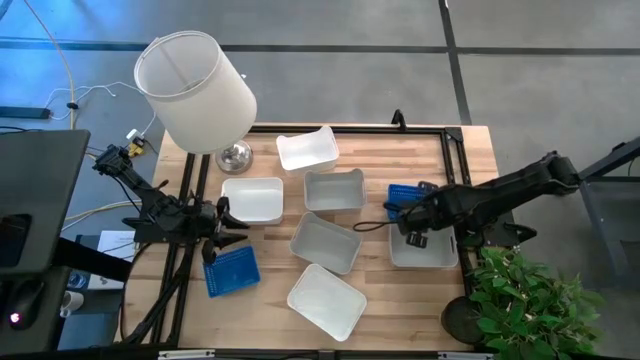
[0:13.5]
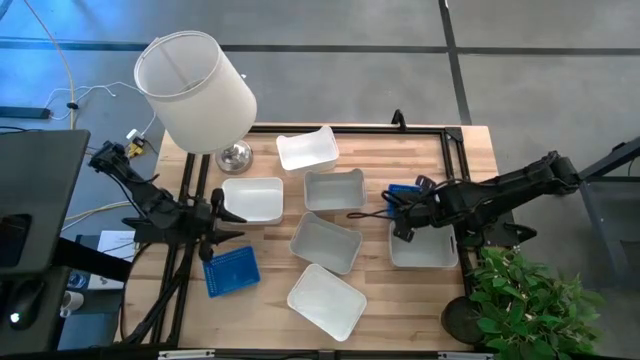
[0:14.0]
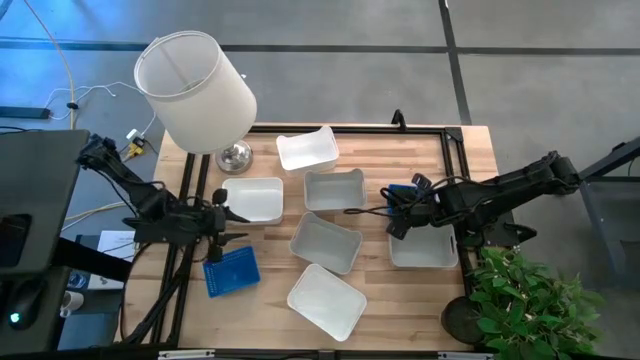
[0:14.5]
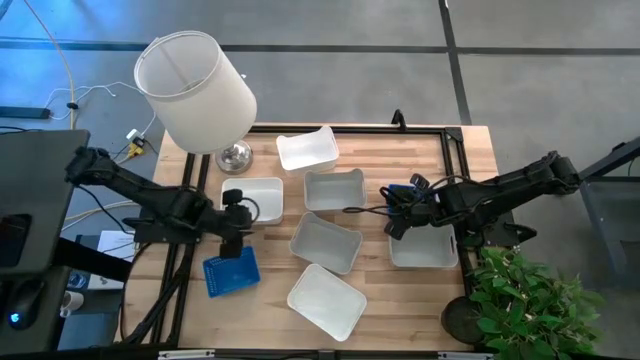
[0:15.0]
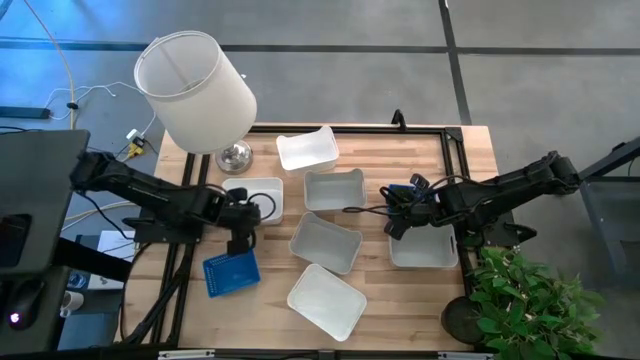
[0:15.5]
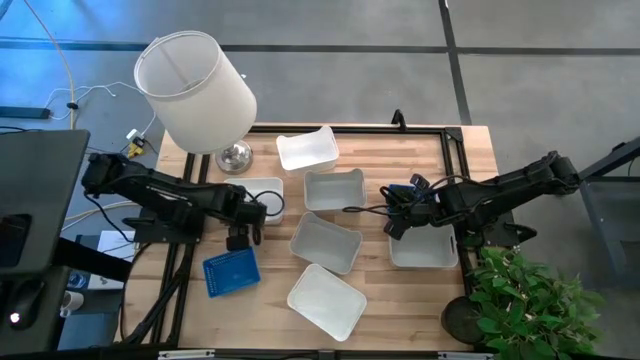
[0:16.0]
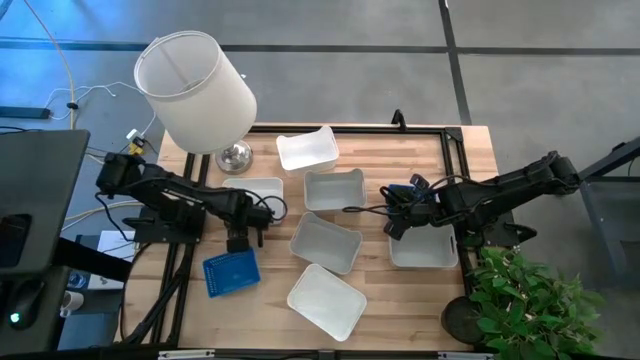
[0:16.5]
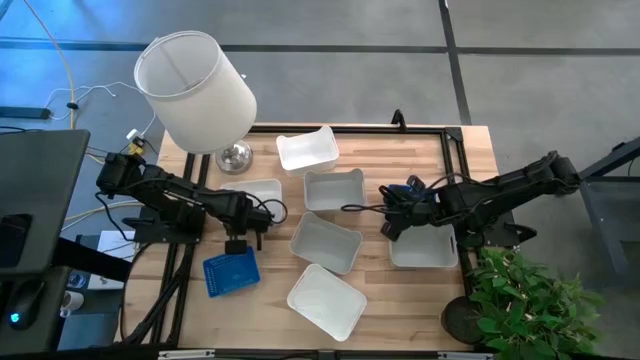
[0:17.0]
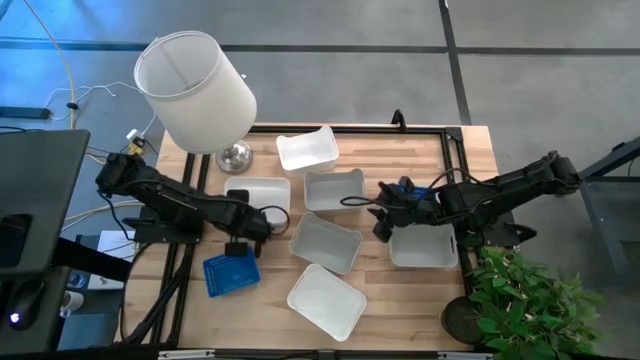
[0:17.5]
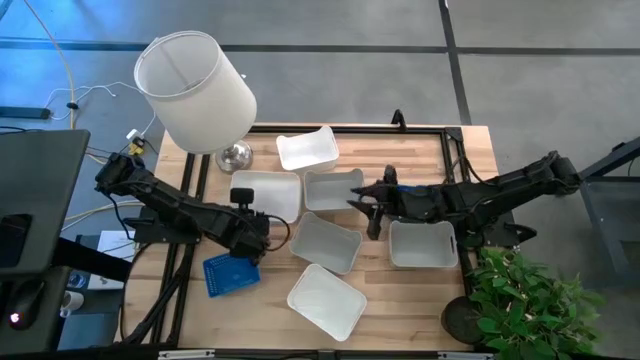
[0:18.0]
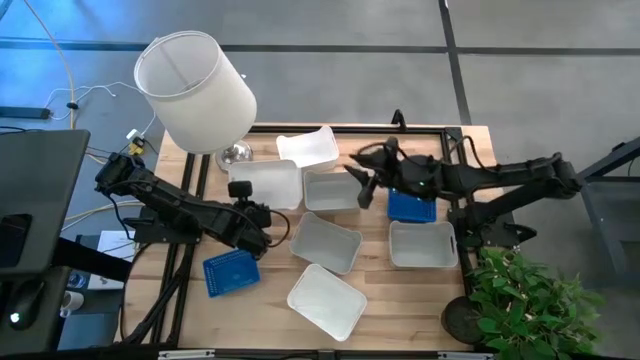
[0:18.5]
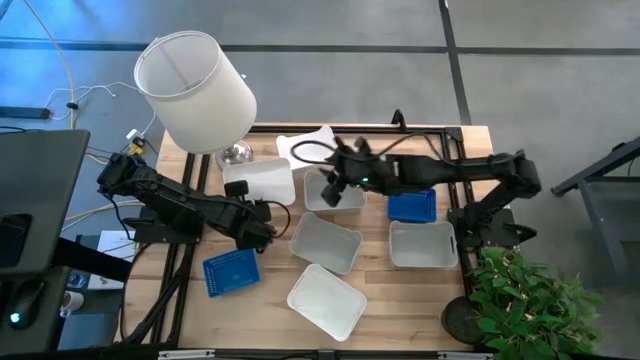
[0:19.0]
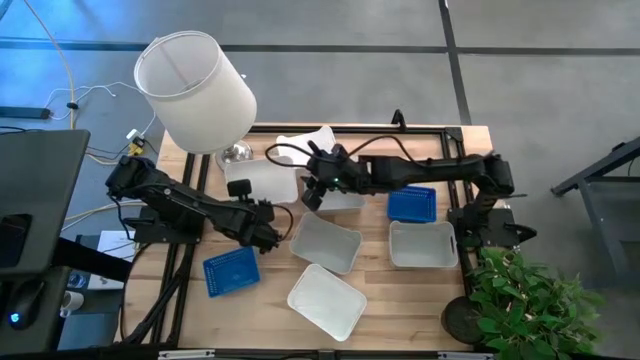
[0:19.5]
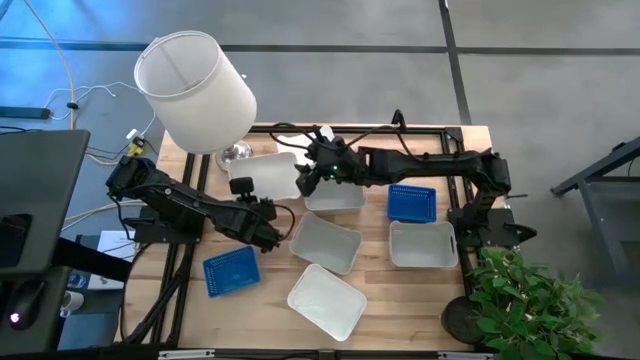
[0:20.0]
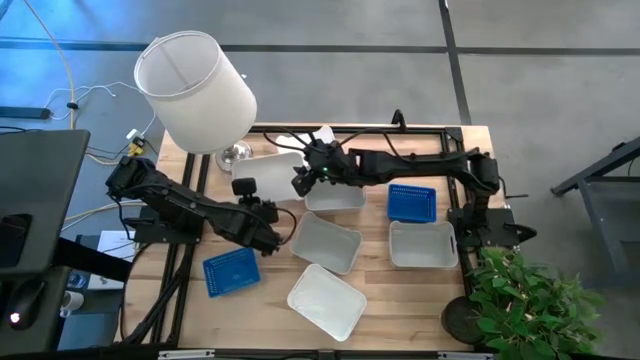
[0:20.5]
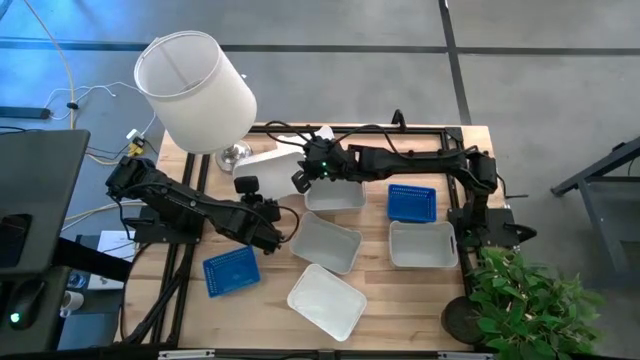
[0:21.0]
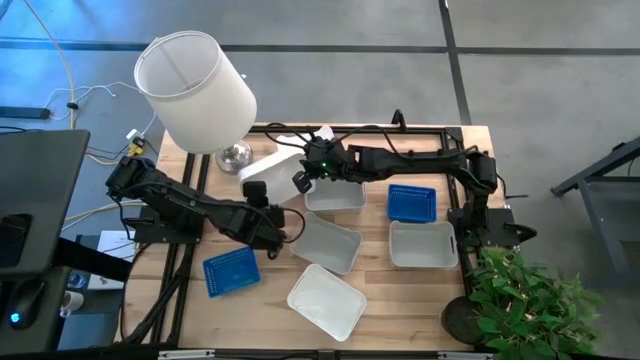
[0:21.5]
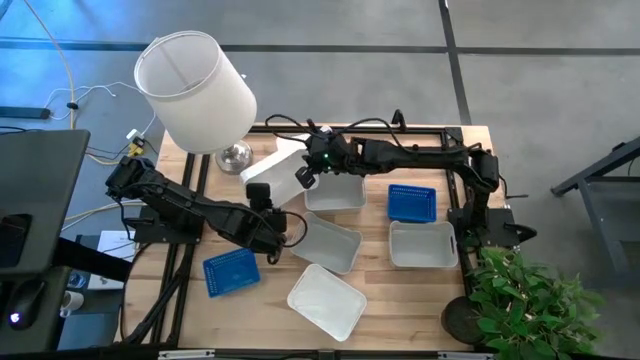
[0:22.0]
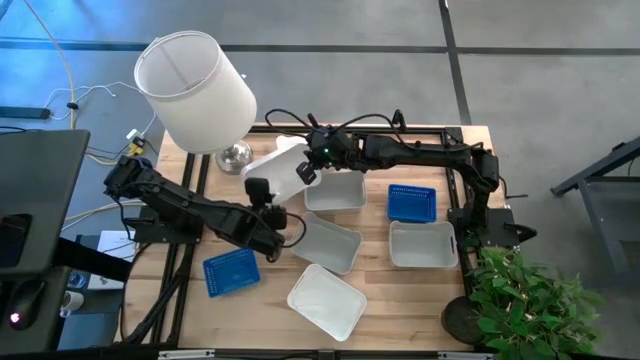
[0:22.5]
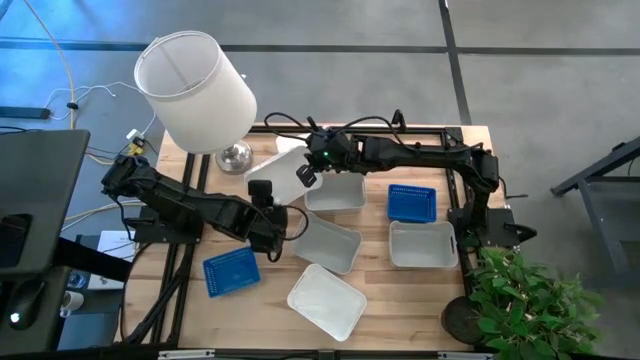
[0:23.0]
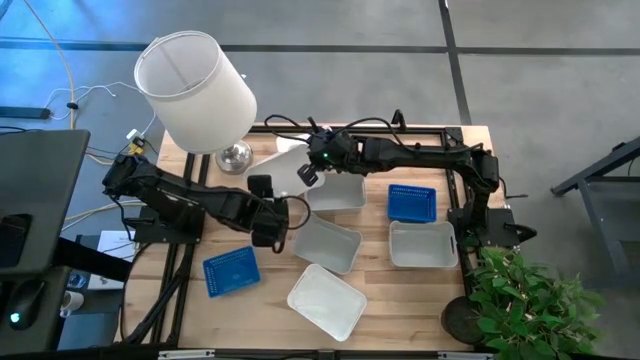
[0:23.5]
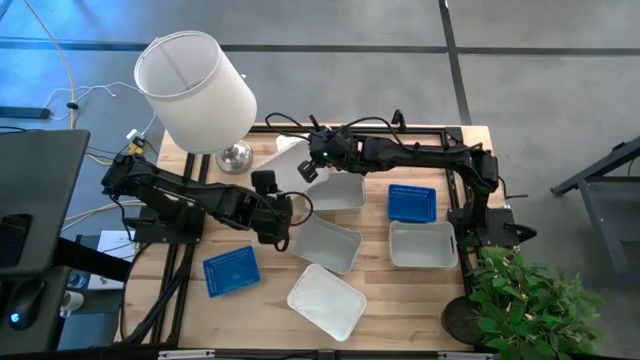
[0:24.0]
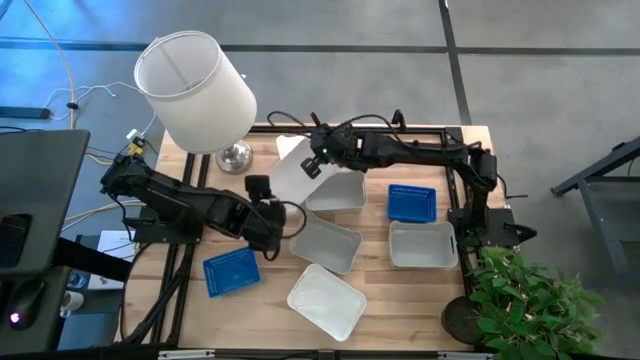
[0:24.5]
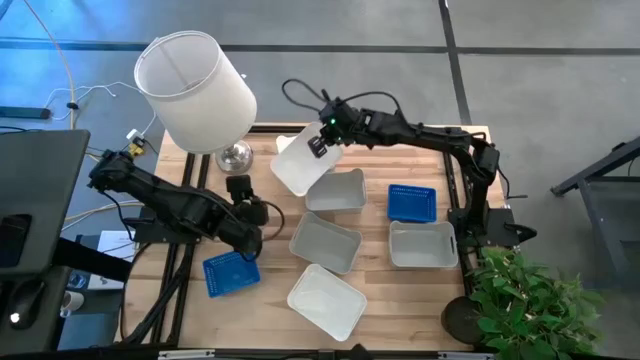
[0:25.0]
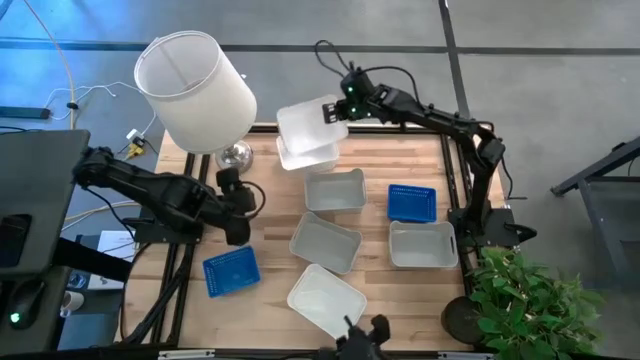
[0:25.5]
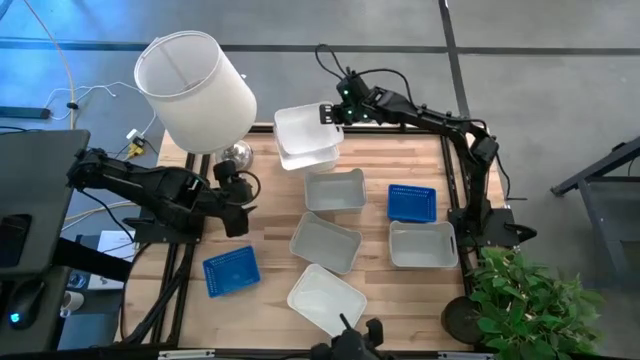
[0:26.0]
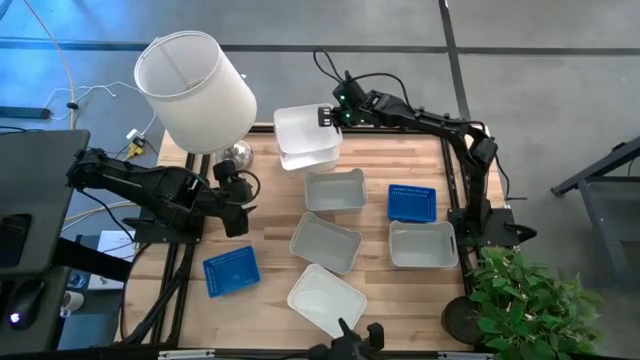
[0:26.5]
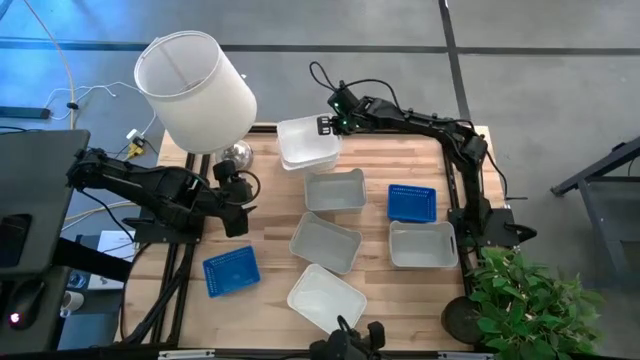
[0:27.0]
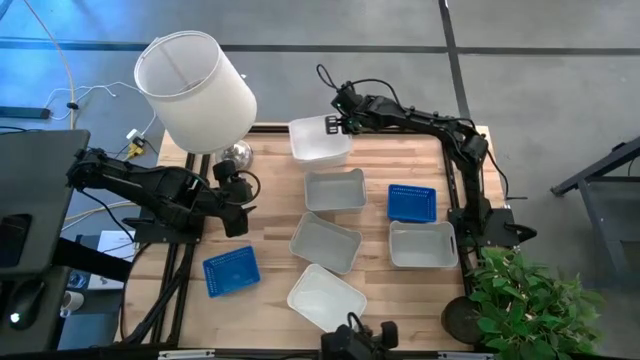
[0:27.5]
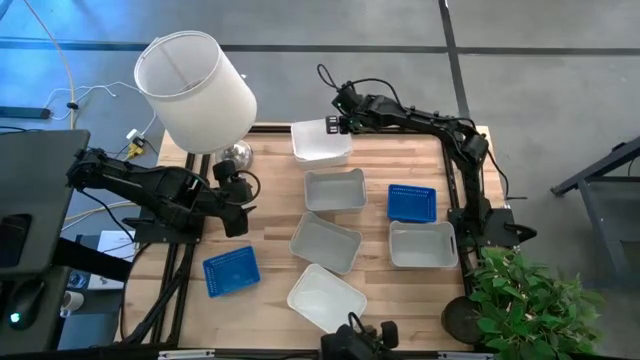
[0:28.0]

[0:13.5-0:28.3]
Stack the middle white bin into the top white bin

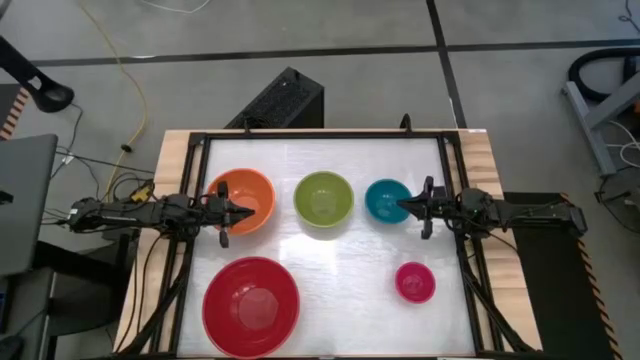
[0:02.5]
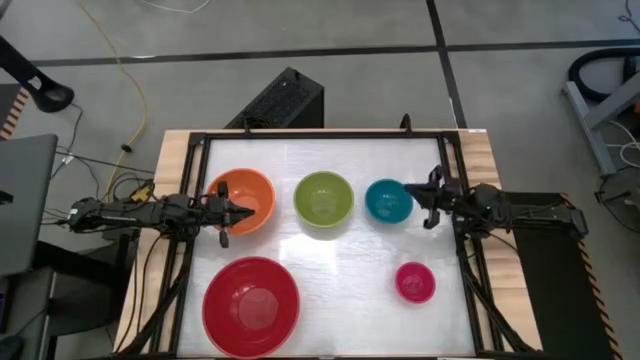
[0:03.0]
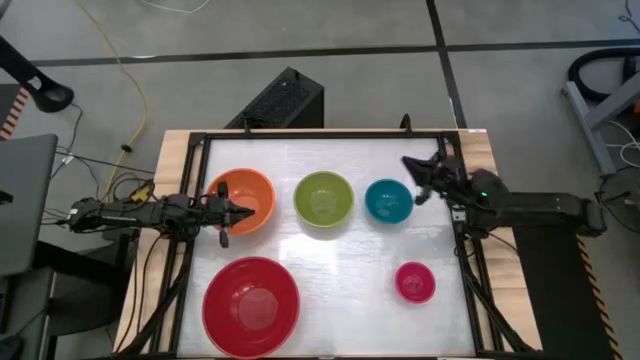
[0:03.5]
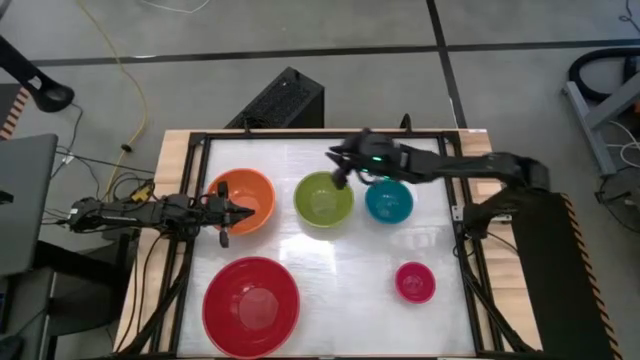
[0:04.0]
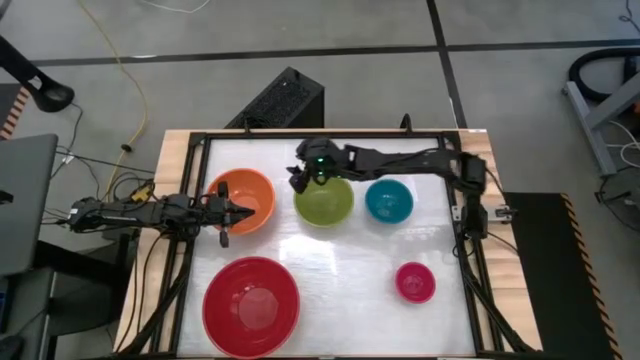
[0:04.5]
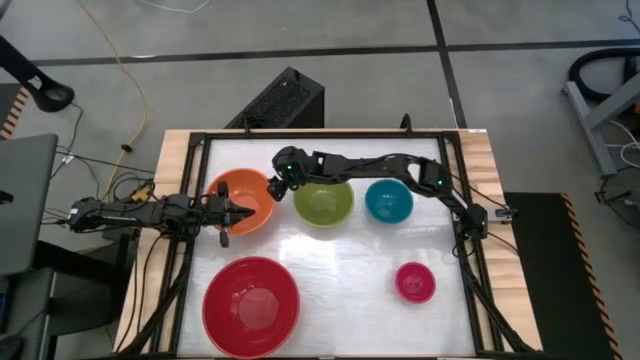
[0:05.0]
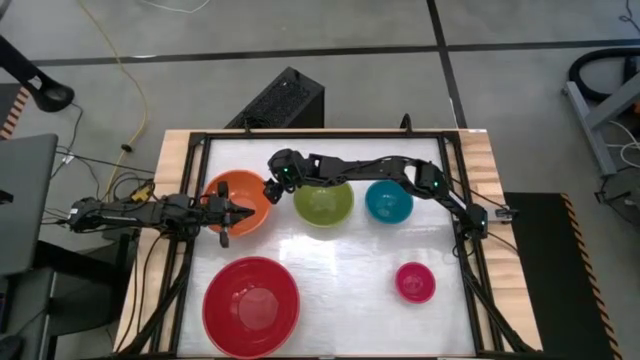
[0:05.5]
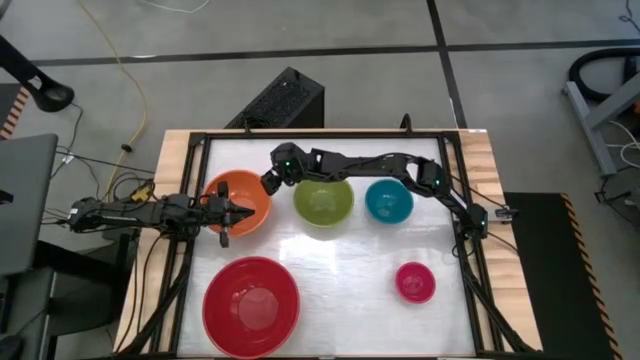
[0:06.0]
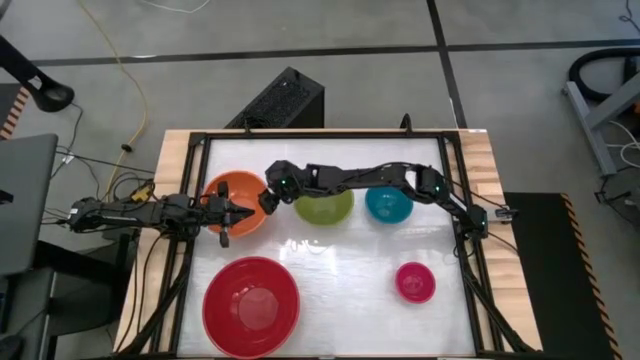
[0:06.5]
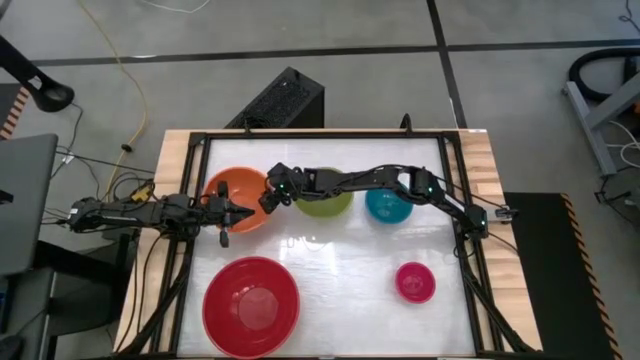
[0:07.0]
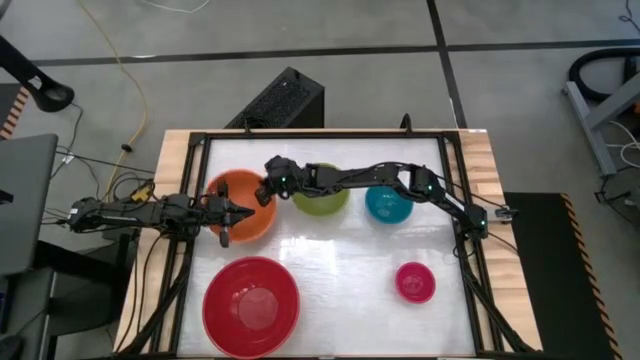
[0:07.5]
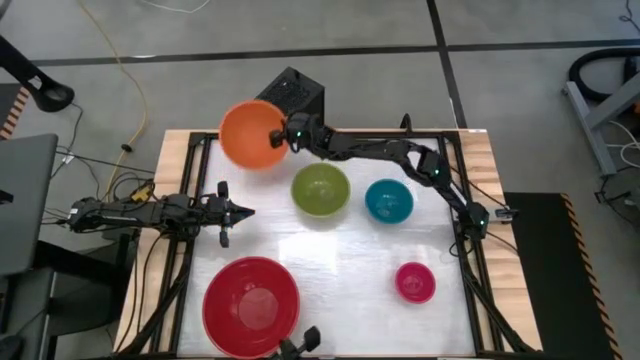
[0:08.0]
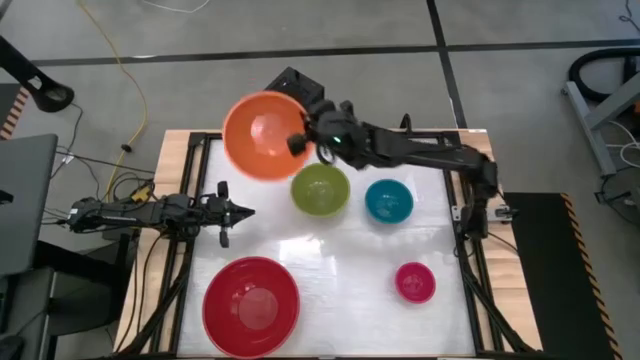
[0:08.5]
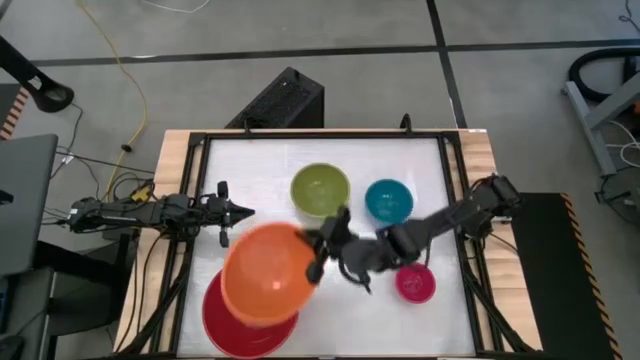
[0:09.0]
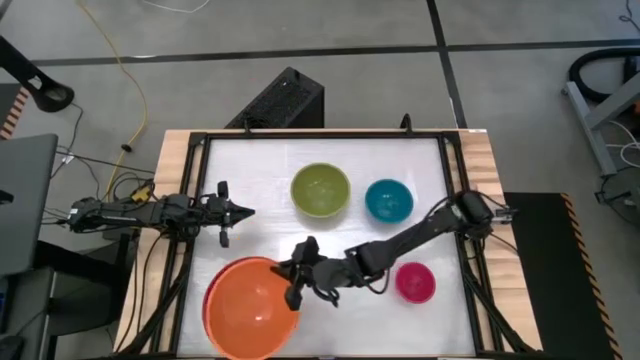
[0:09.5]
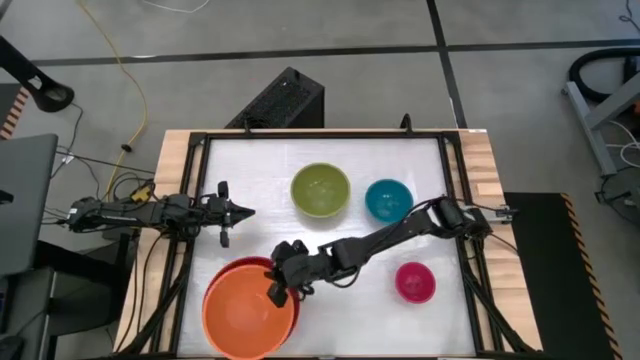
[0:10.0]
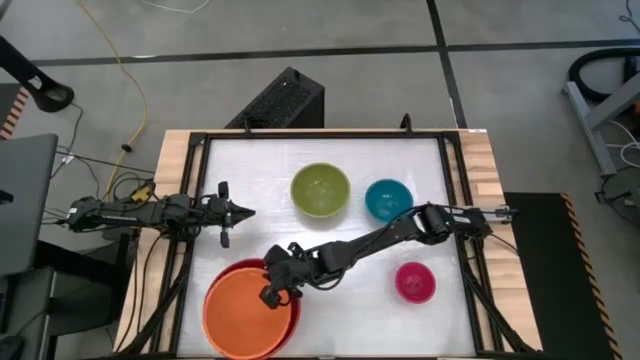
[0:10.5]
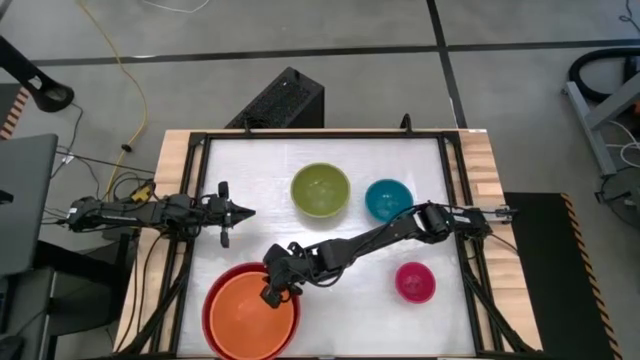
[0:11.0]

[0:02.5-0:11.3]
Stack the orange bowl on top of the red bowl
